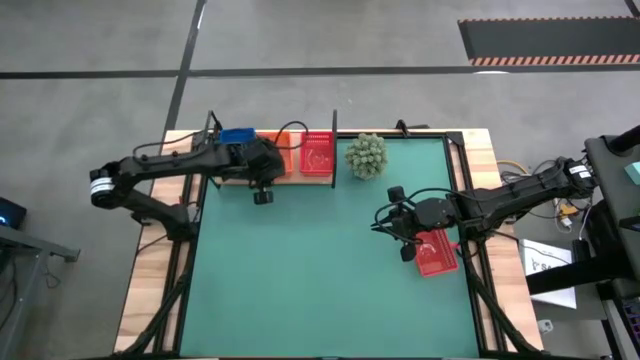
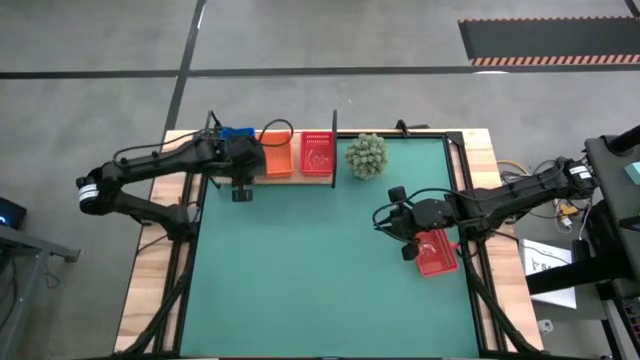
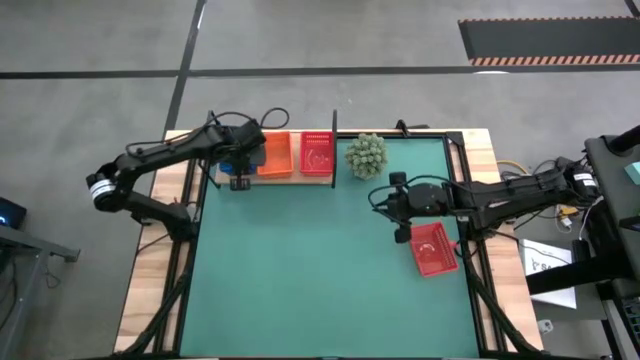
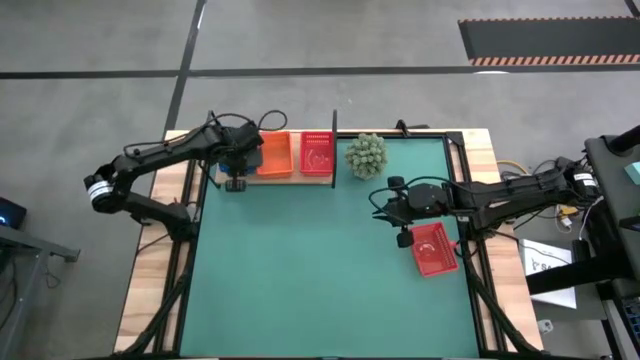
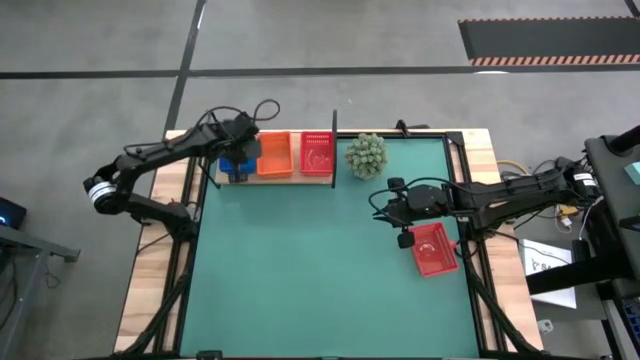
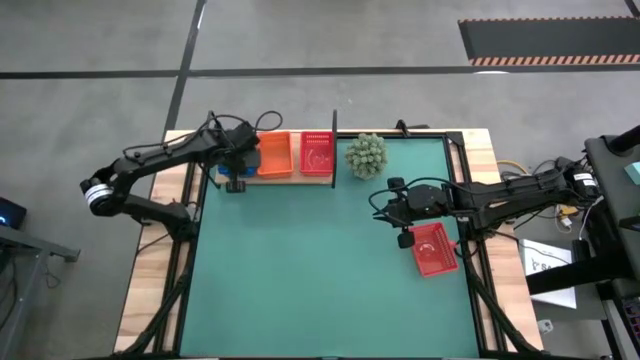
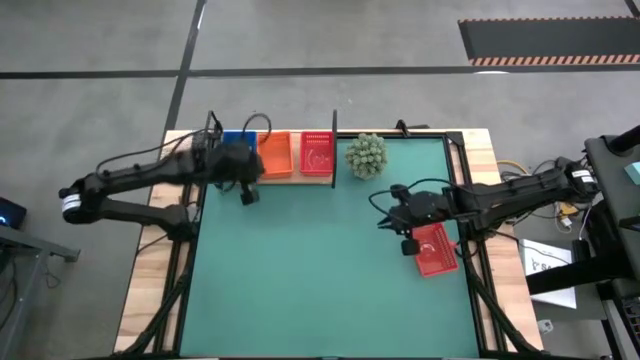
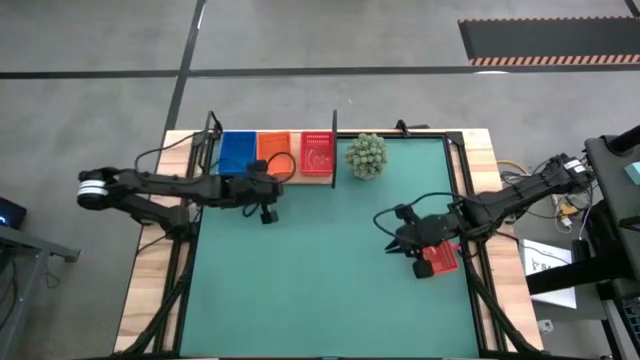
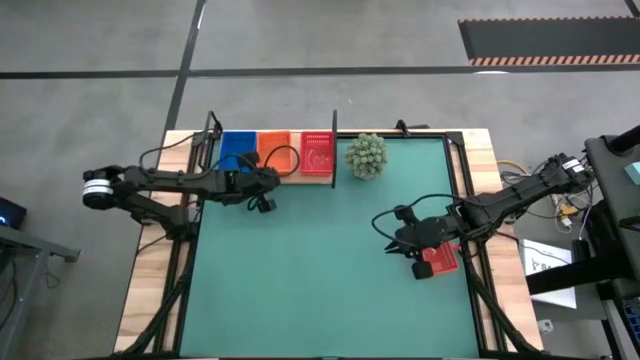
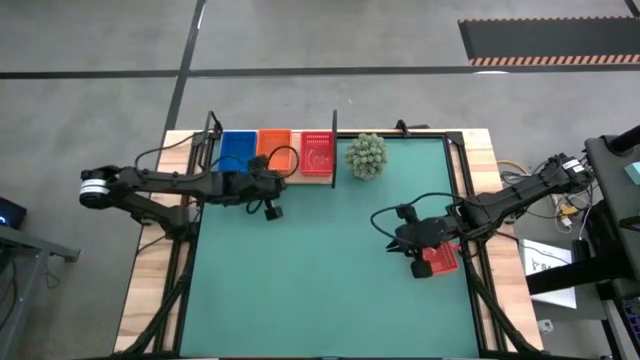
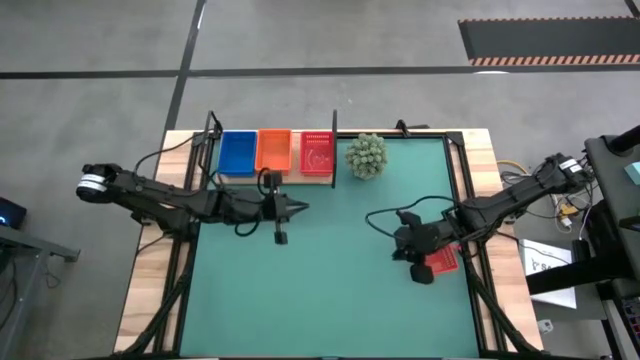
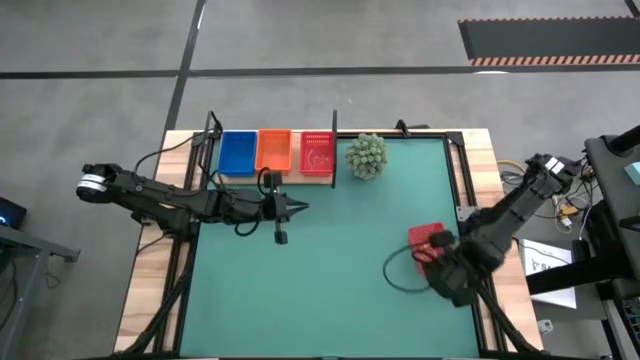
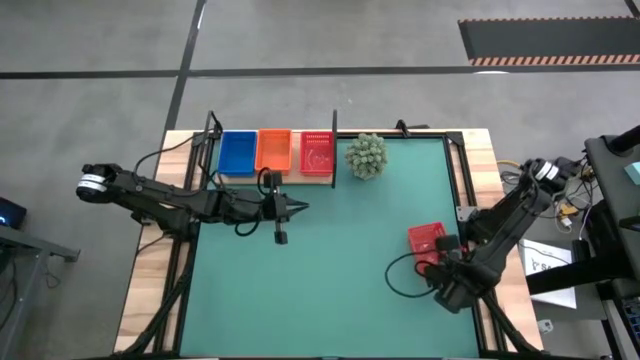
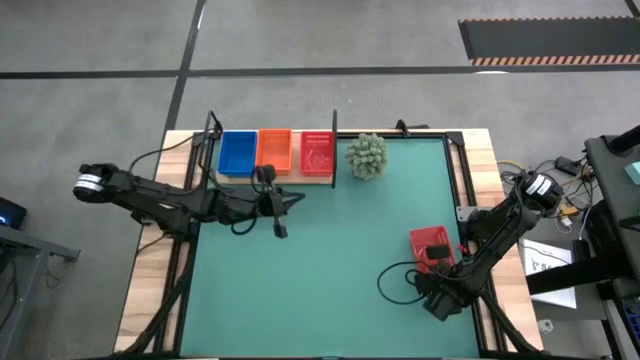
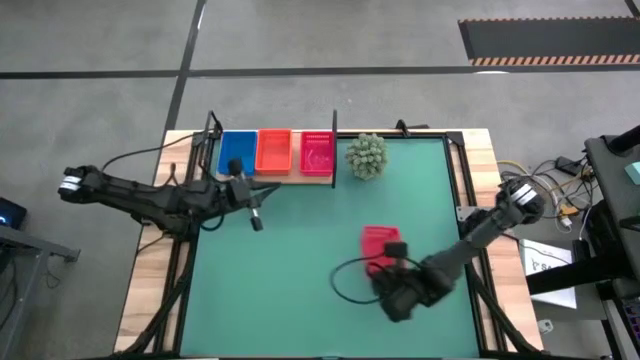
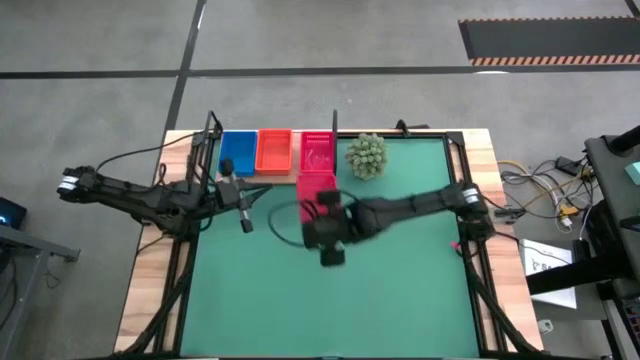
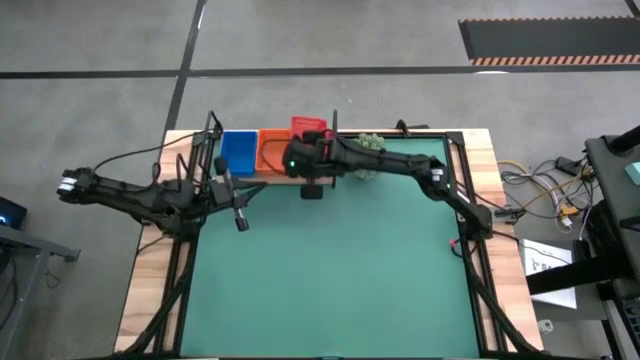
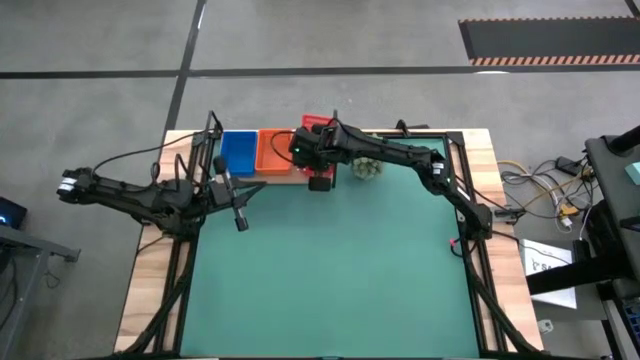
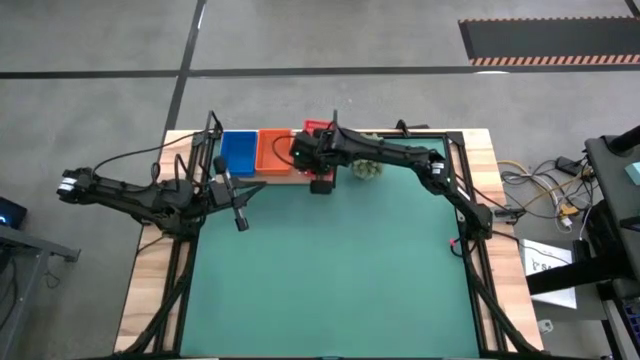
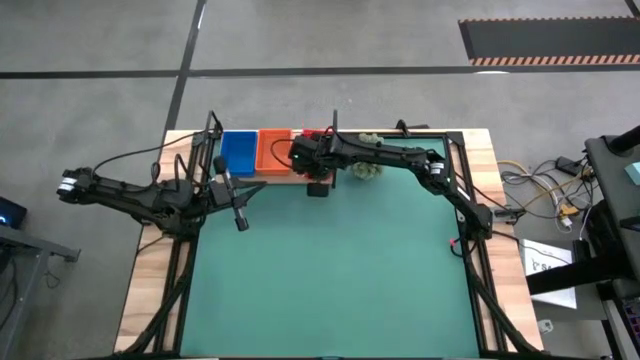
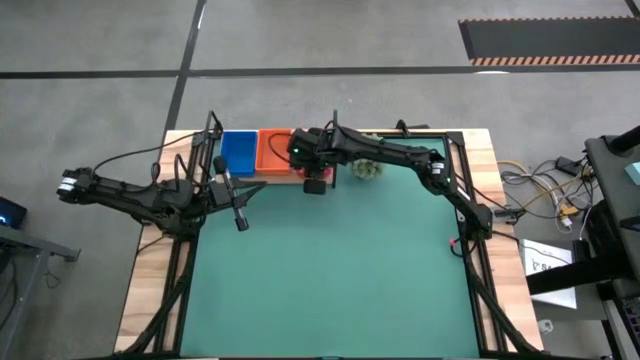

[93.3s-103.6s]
Task: Stack baskets on shelf by color
Stack the red bin on the red bin on the shelf

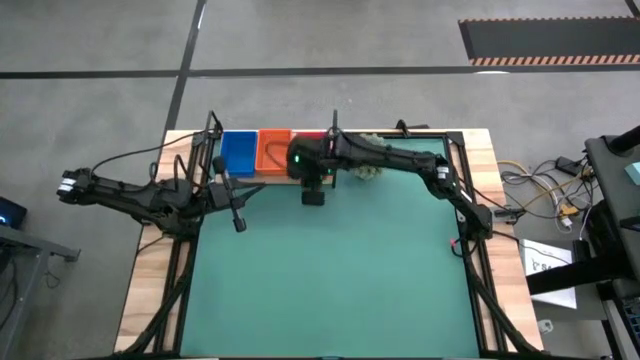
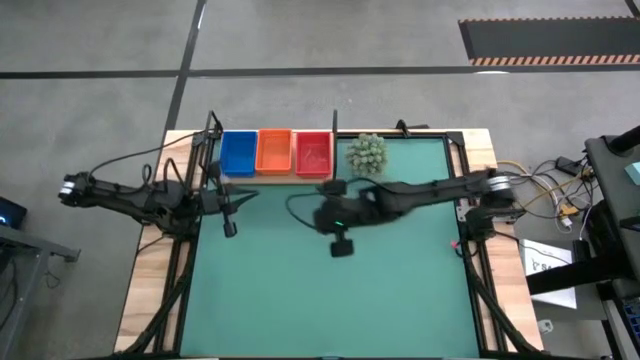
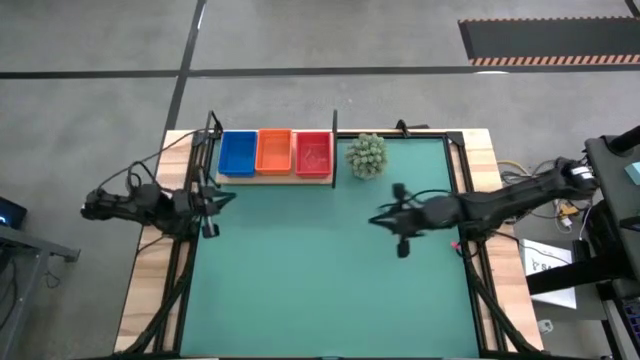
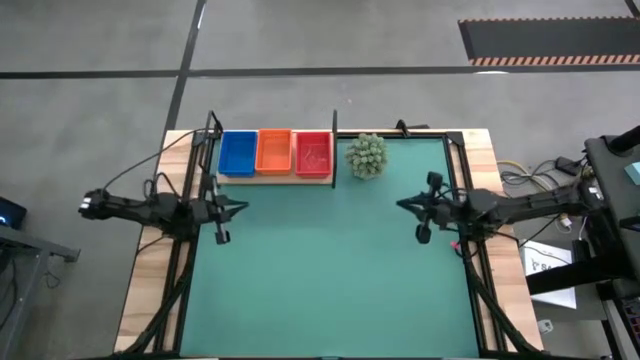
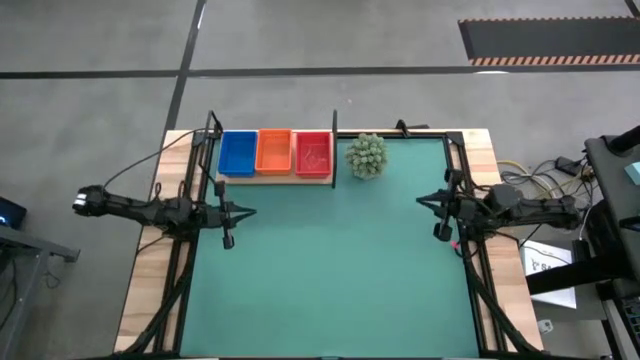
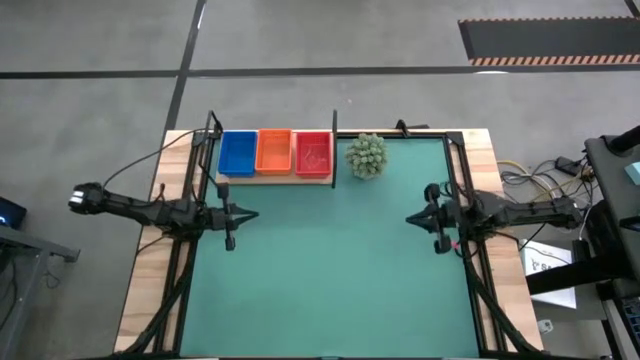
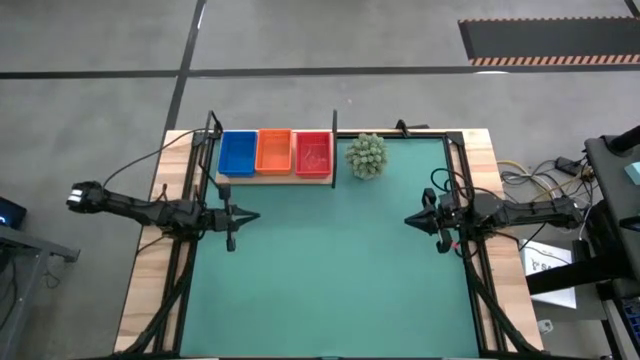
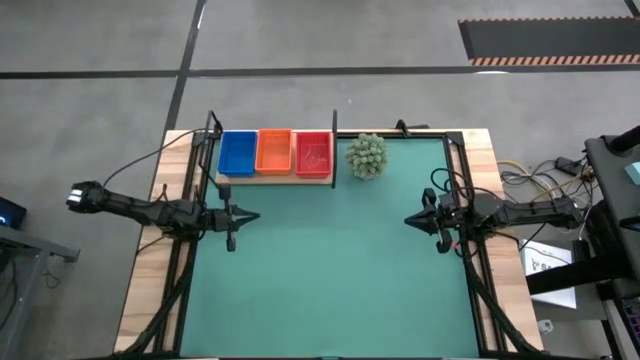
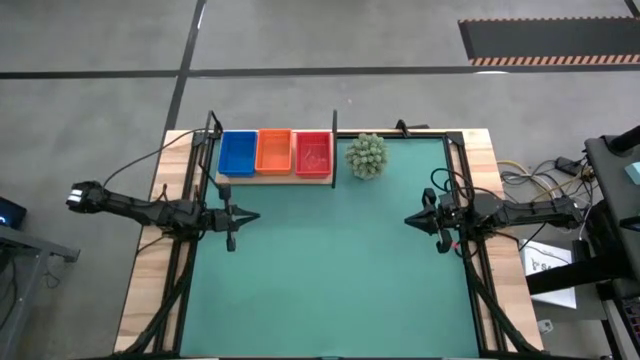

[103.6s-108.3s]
Return to Home Position

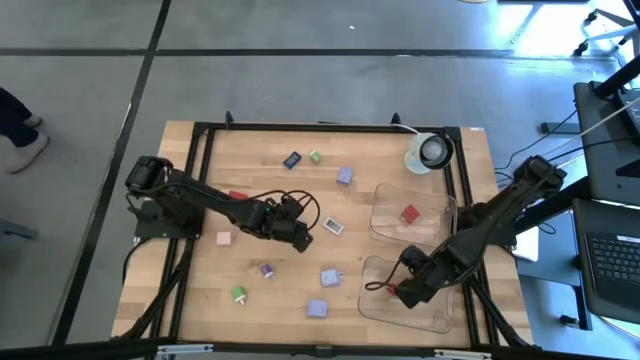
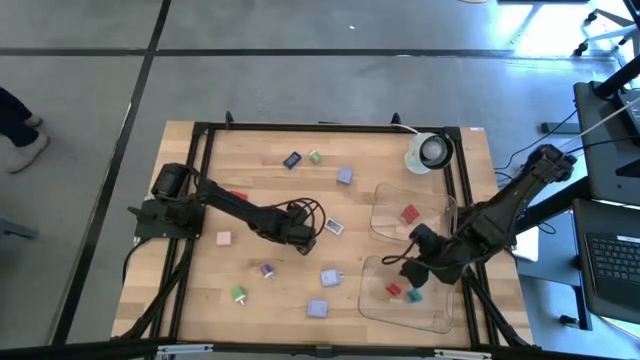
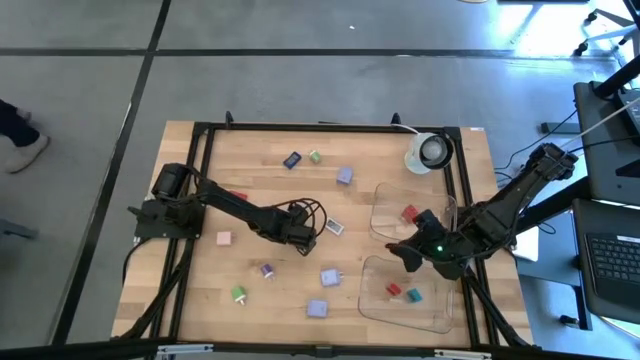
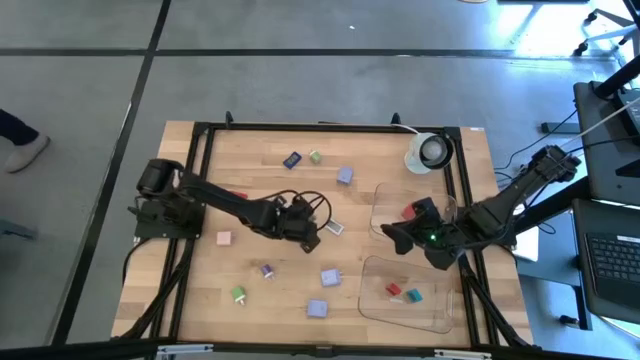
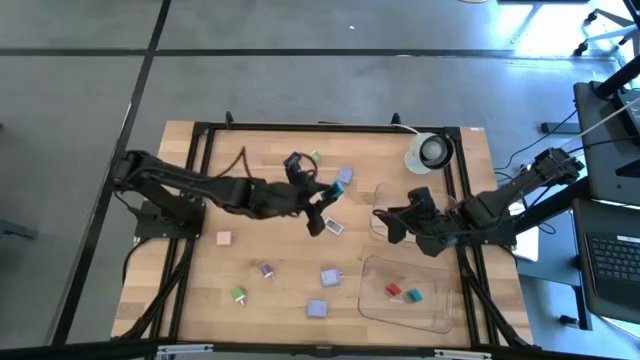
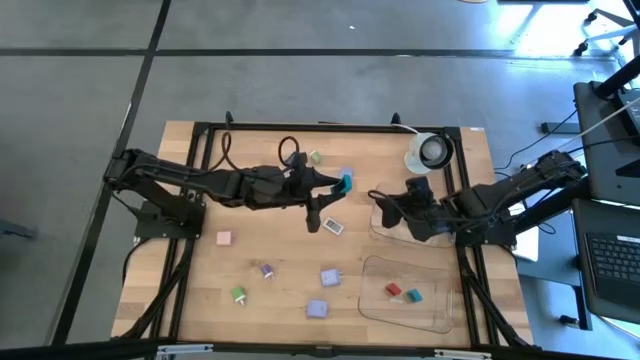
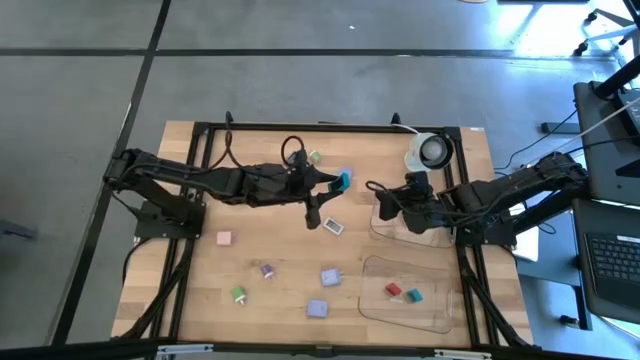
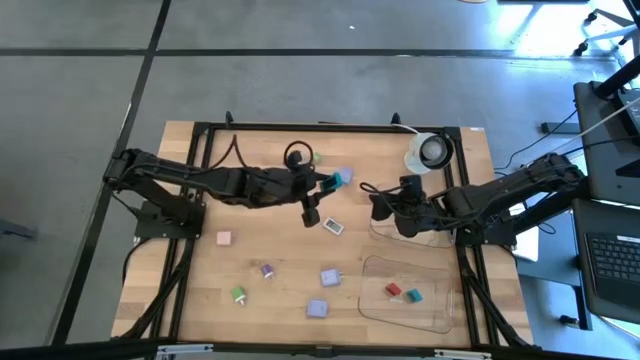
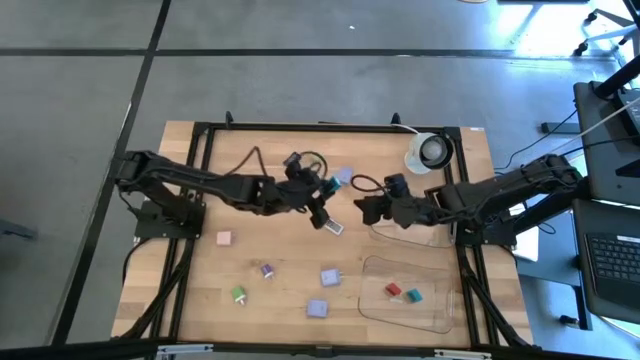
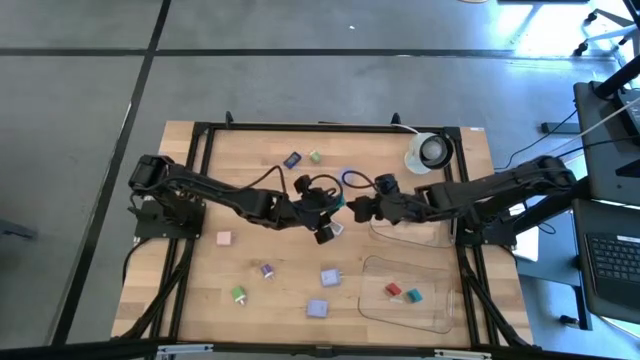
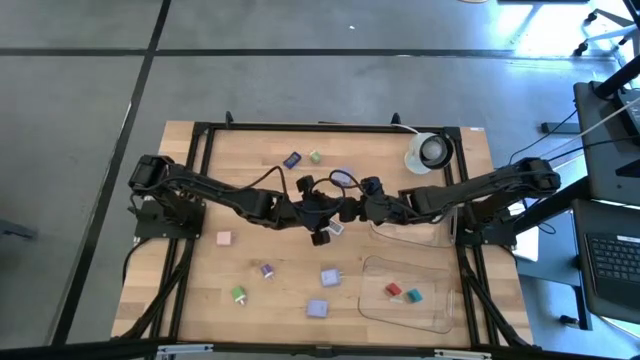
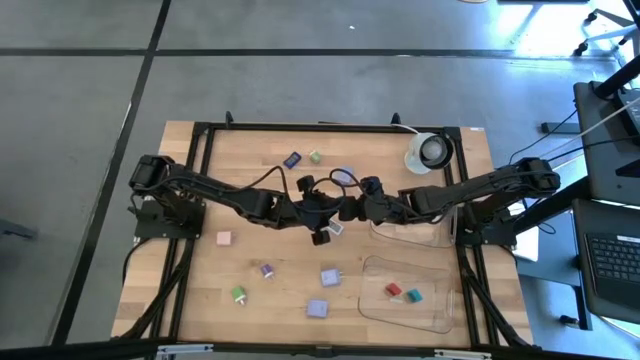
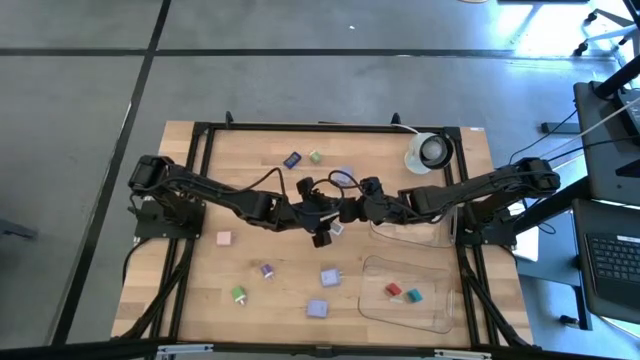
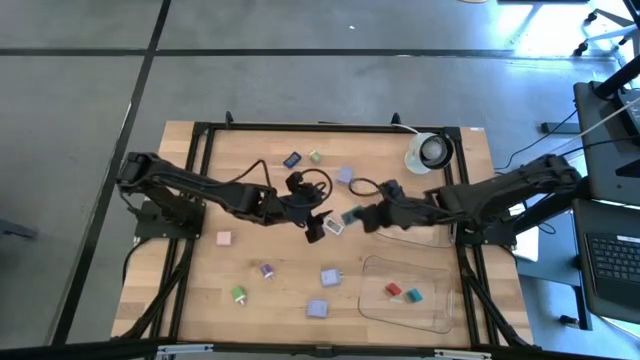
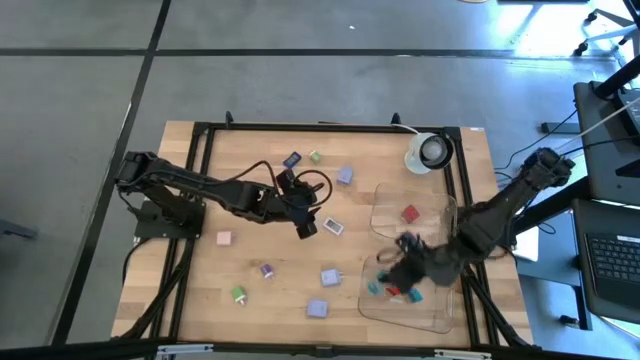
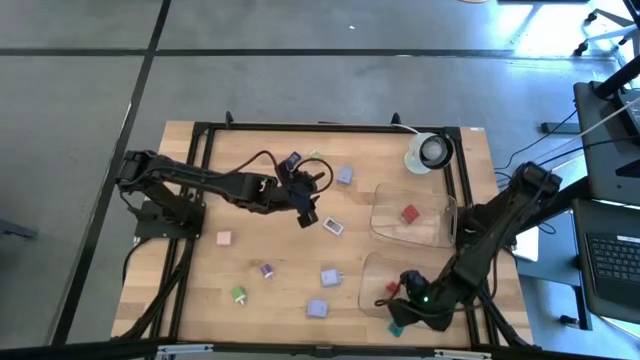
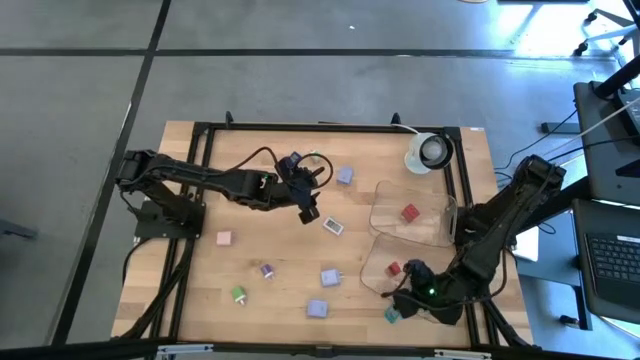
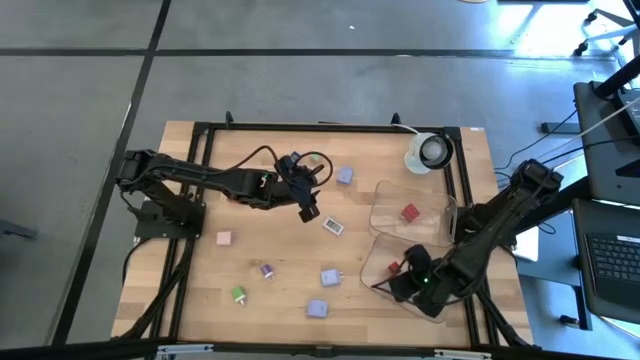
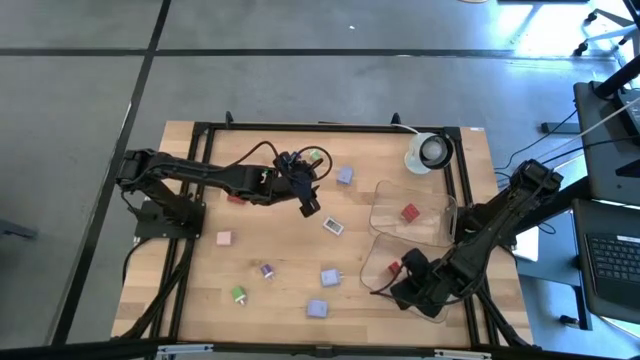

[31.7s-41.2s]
Task: Pick & Place Office items
Put the blue digital timer into the bottom transparent bin
